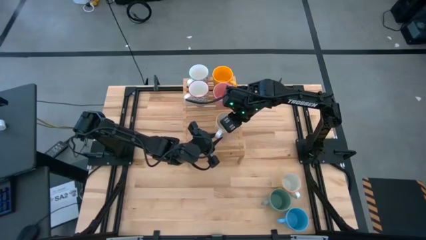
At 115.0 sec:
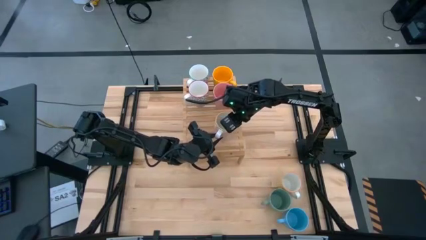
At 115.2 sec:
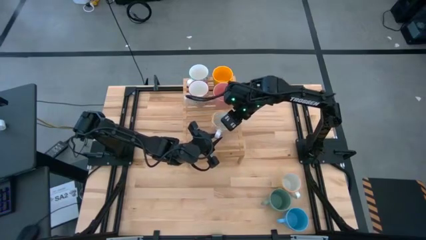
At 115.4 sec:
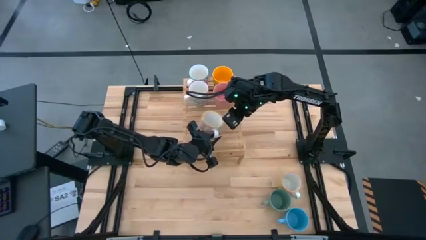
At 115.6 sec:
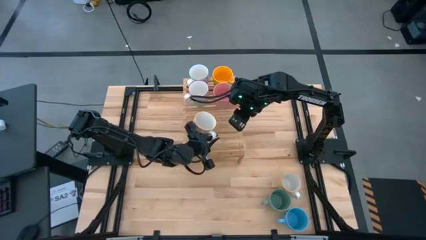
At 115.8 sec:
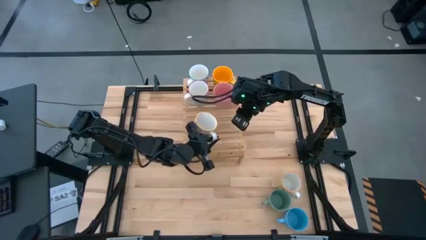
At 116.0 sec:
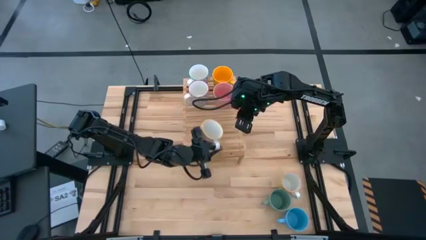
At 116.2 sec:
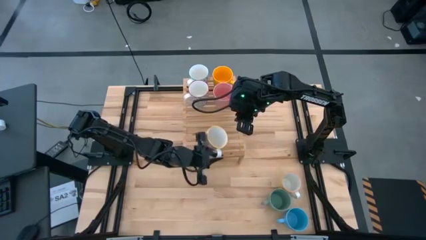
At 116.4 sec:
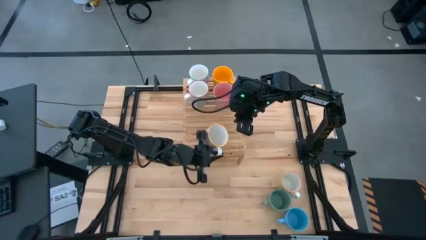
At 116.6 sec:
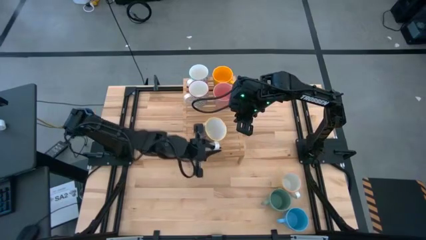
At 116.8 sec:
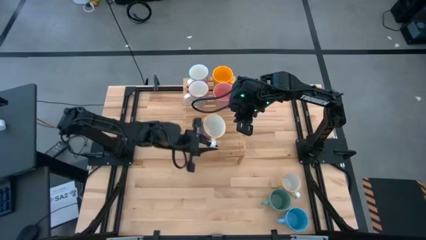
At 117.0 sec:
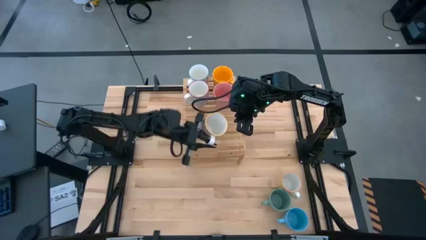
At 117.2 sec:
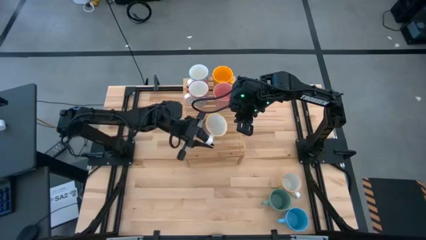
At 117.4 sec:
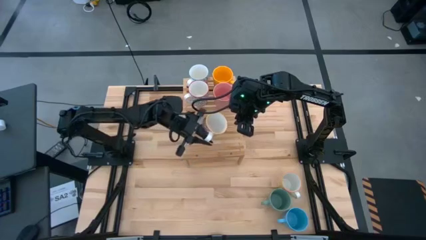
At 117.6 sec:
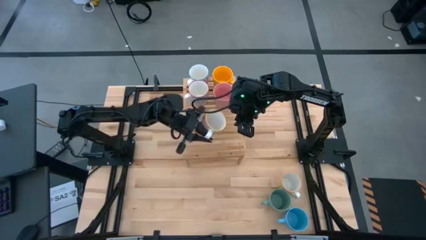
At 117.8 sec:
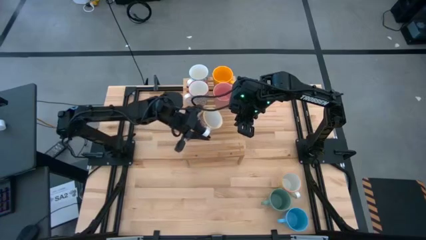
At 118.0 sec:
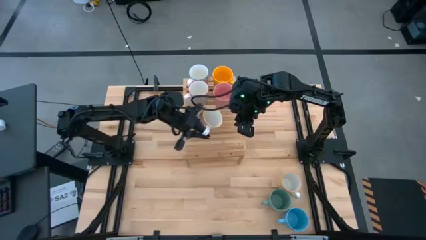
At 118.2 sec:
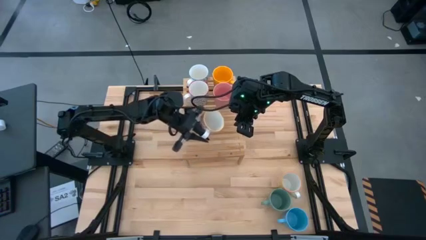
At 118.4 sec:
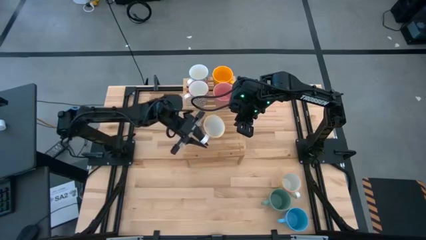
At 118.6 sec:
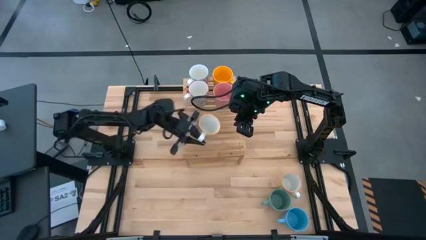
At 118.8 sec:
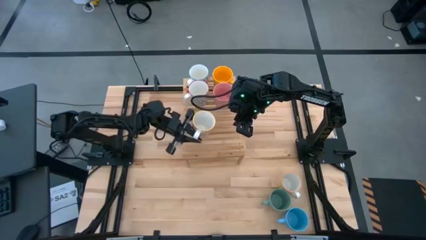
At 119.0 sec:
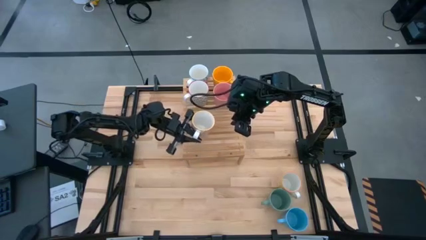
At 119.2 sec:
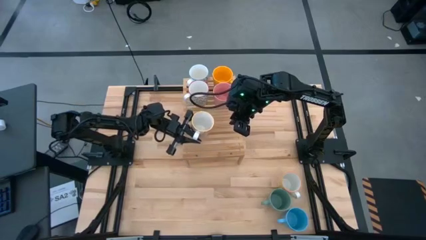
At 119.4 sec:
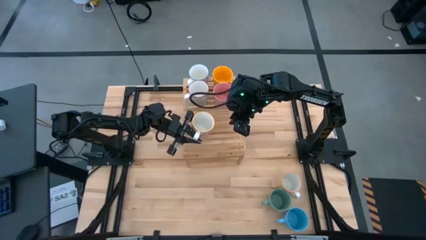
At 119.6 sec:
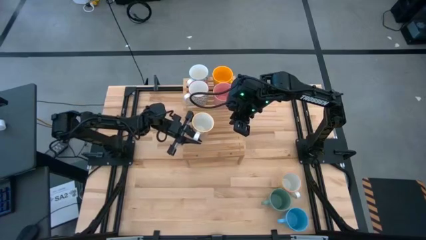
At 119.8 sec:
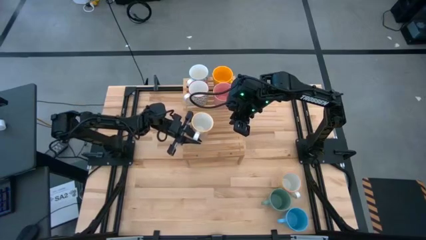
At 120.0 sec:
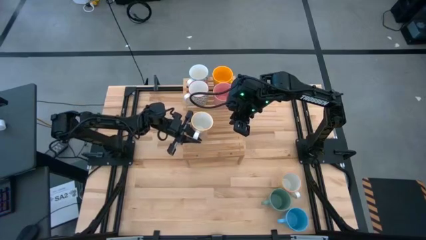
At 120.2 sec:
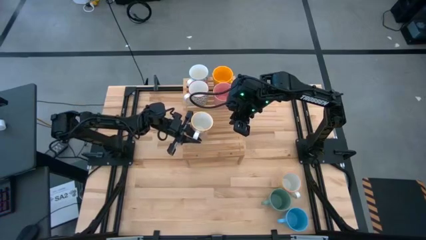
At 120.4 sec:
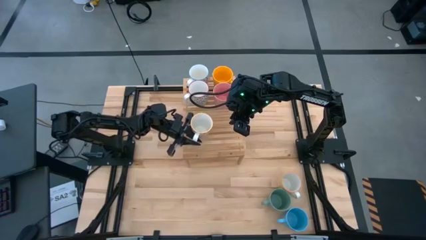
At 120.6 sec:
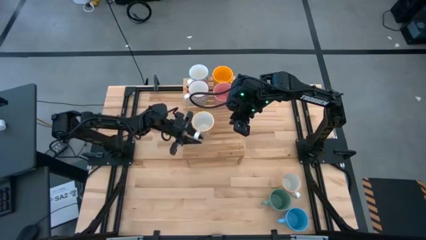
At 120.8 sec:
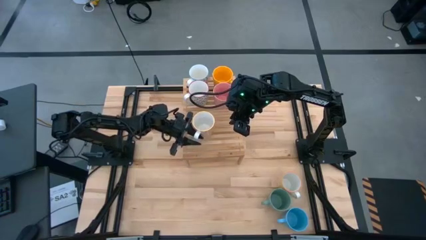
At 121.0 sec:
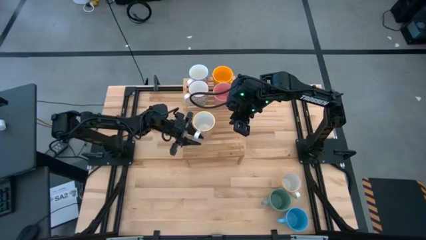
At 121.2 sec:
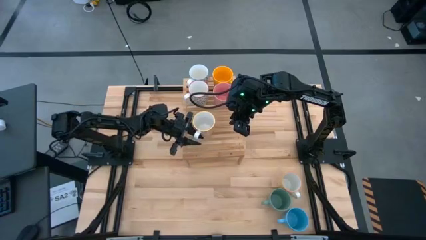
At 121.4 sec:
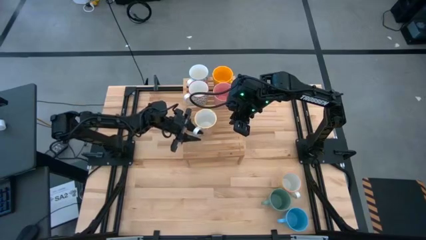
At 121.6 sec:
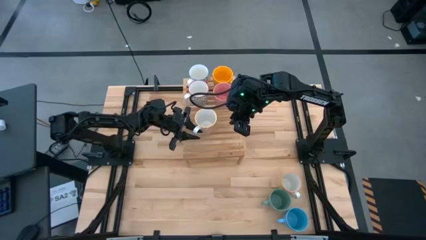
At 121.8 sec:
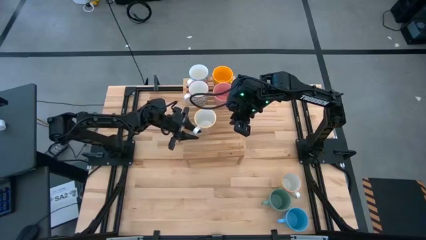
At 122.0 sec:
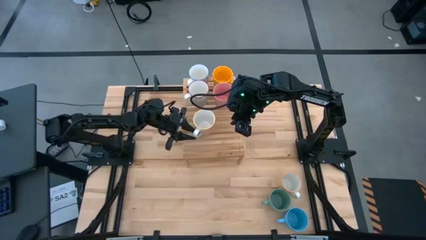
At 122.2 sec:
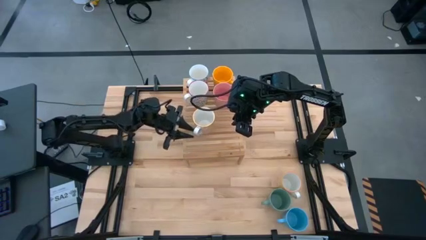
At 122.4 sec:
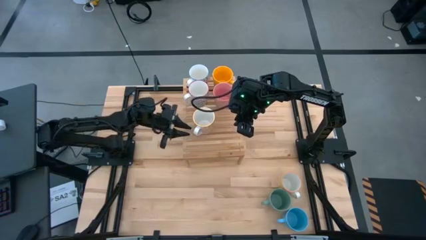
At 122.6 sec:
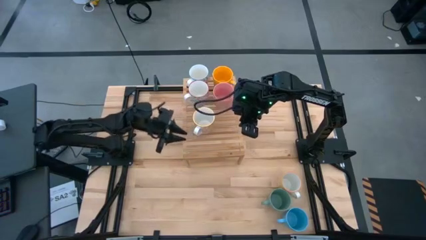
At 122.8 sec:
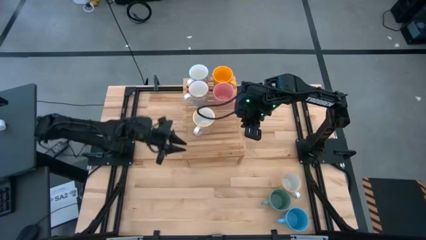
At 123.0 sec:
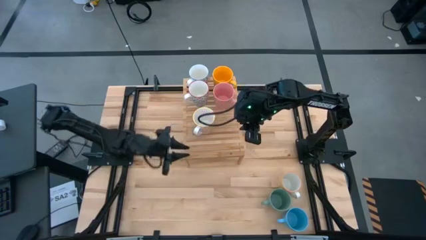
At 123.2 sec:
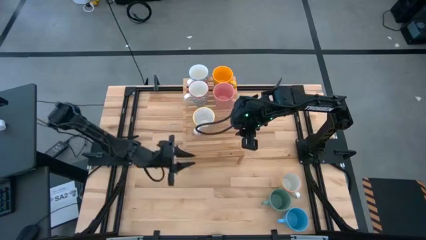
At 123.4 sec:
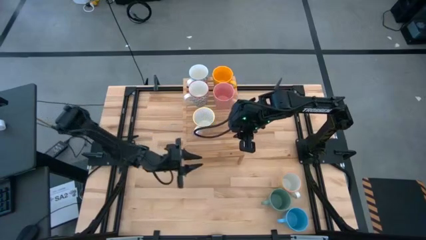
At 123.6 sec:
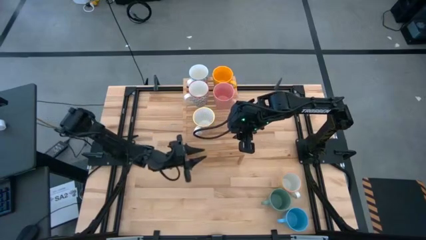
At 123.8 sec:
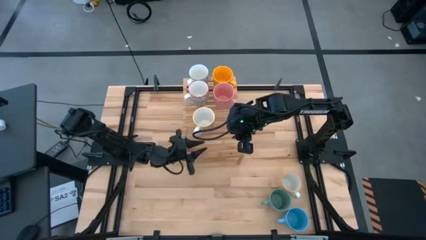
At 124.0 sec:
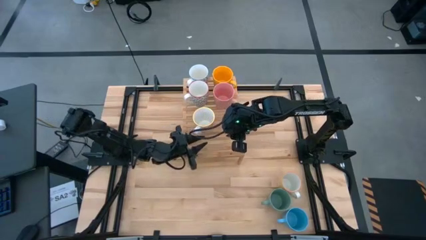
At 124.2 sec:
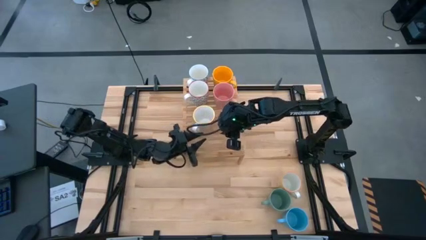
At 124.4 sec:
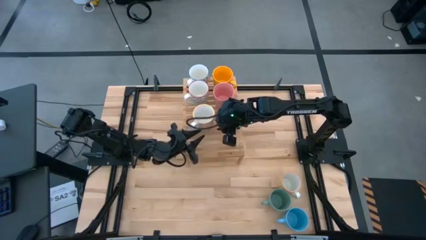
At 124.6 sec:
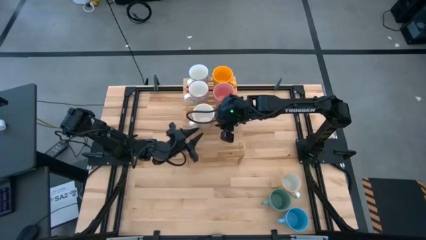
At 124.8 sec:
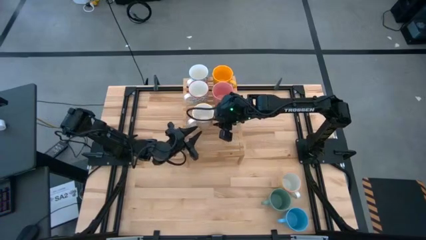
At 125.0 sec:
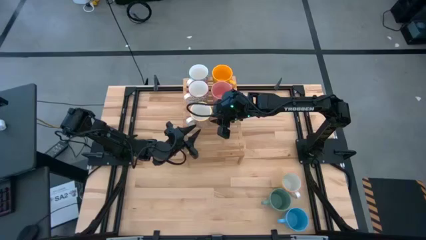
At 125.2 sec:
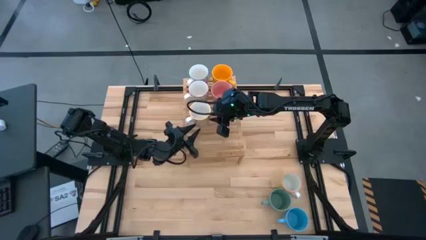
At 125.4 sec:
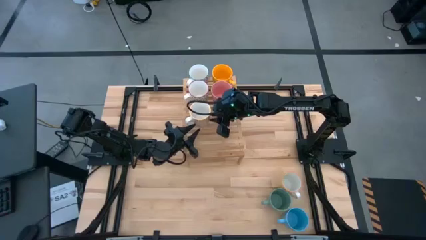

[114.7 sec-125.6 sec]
Task: Place coffee mugs
Put the orange cup on the shelf aligned with the other gray cup

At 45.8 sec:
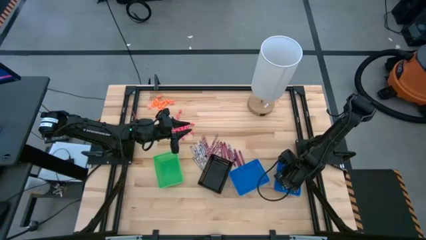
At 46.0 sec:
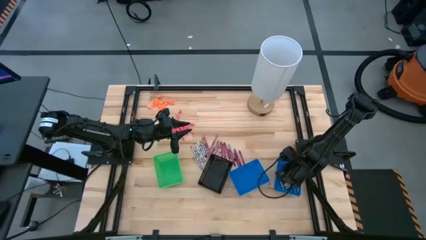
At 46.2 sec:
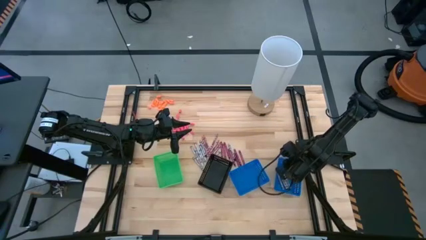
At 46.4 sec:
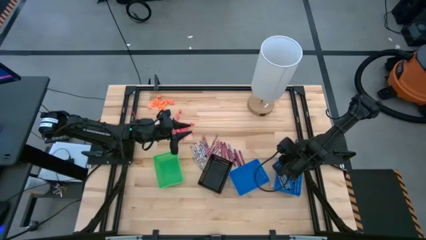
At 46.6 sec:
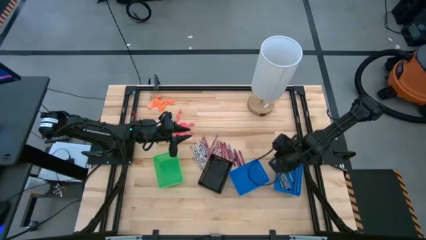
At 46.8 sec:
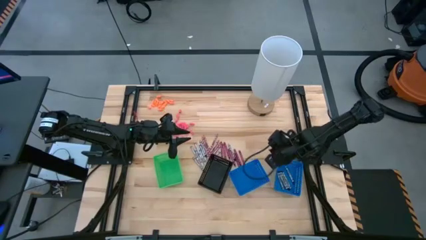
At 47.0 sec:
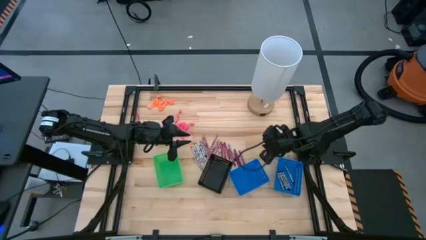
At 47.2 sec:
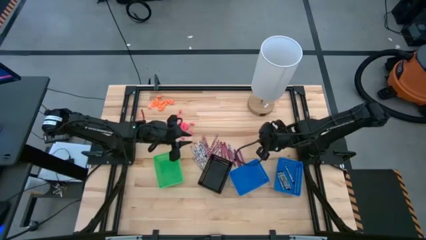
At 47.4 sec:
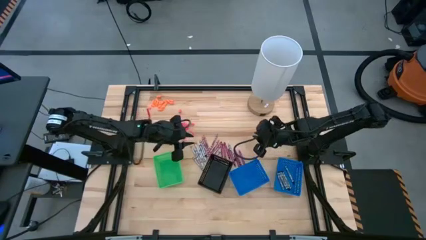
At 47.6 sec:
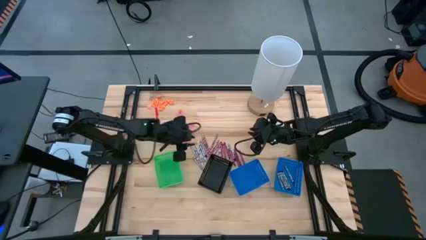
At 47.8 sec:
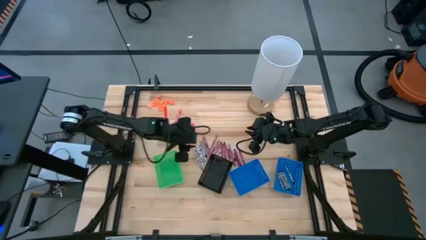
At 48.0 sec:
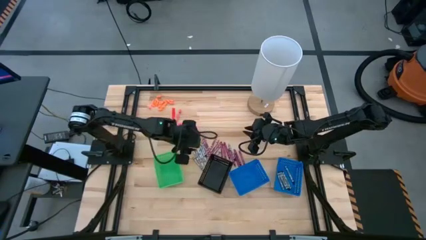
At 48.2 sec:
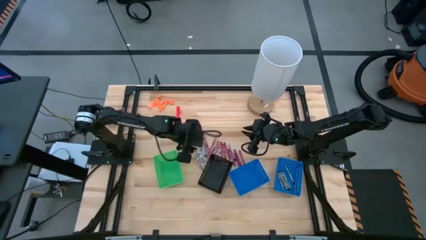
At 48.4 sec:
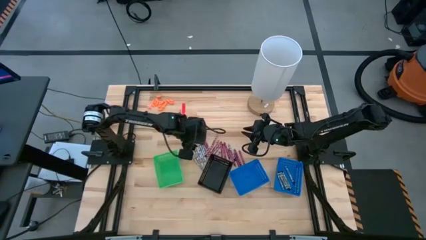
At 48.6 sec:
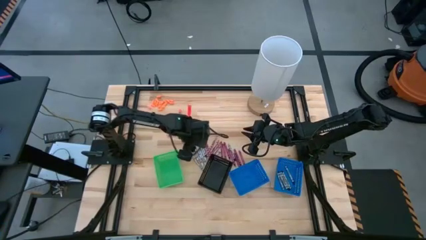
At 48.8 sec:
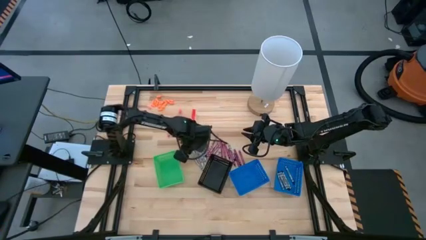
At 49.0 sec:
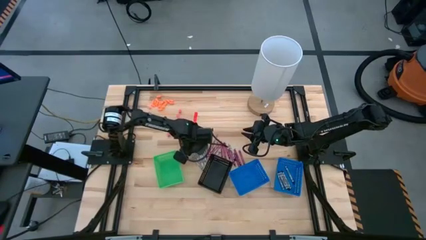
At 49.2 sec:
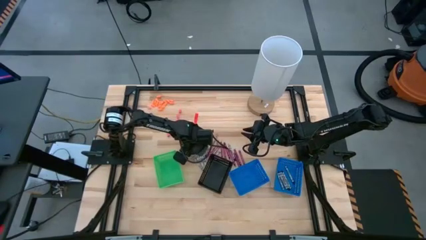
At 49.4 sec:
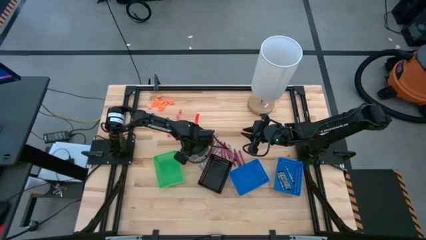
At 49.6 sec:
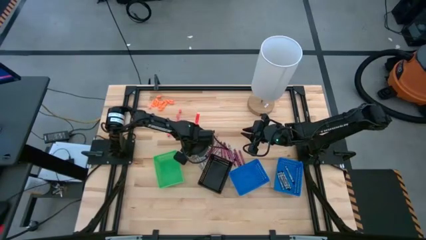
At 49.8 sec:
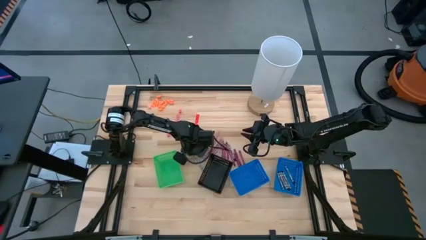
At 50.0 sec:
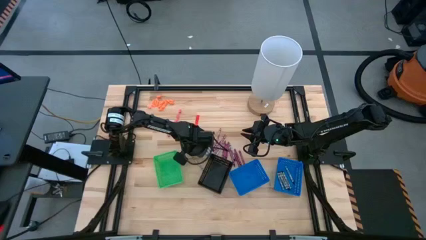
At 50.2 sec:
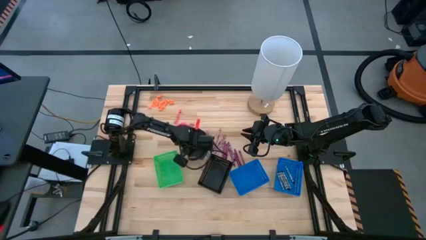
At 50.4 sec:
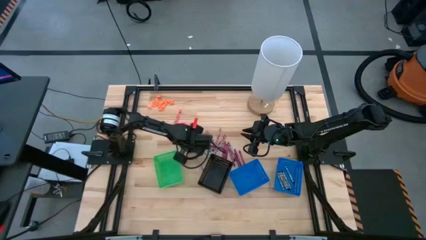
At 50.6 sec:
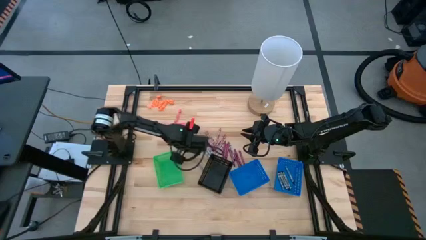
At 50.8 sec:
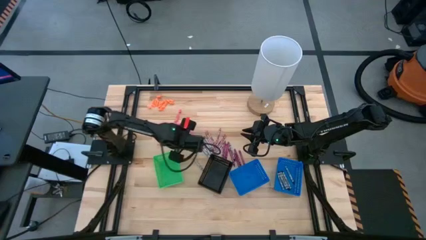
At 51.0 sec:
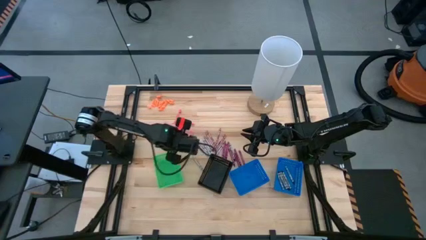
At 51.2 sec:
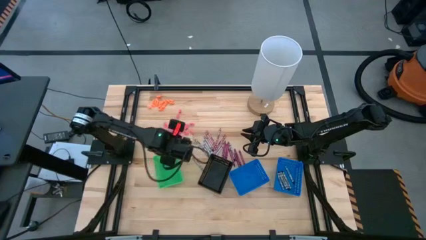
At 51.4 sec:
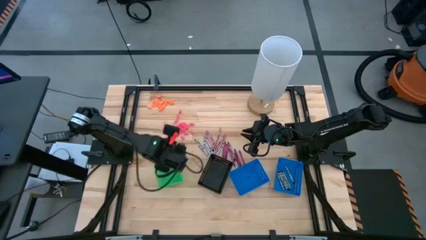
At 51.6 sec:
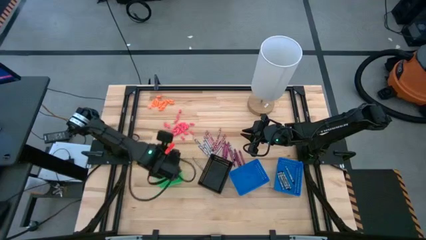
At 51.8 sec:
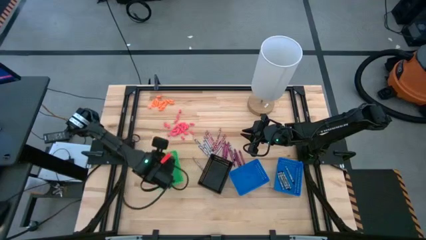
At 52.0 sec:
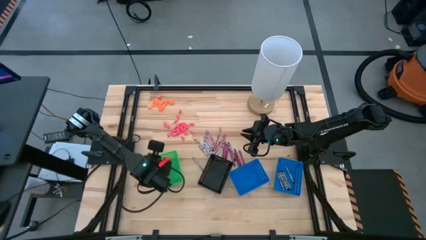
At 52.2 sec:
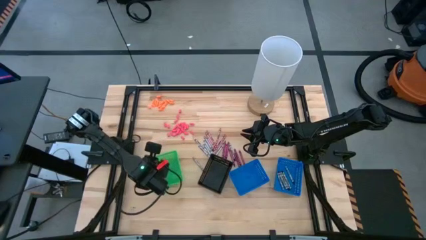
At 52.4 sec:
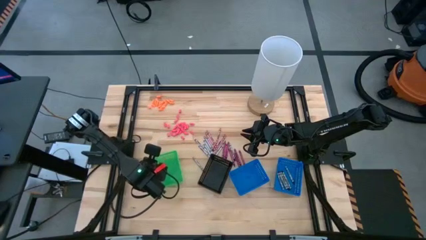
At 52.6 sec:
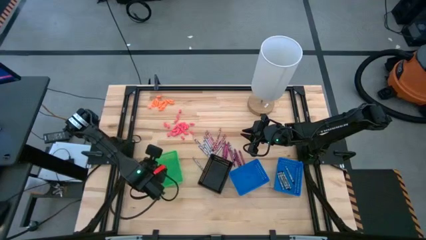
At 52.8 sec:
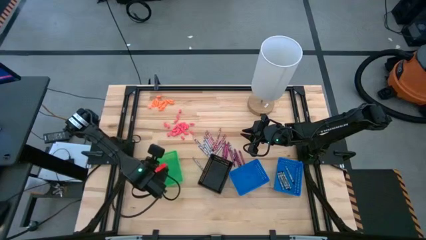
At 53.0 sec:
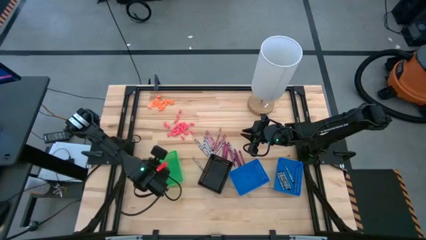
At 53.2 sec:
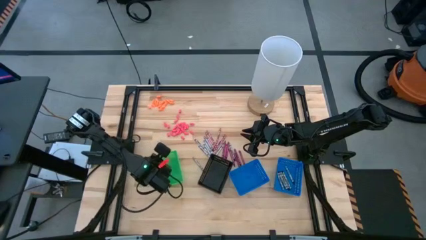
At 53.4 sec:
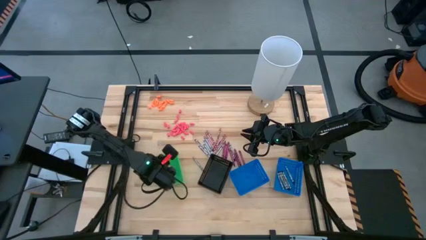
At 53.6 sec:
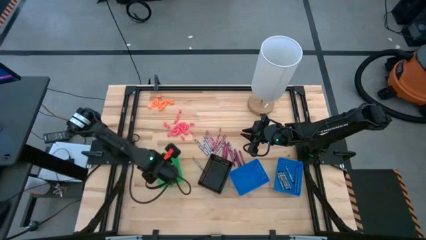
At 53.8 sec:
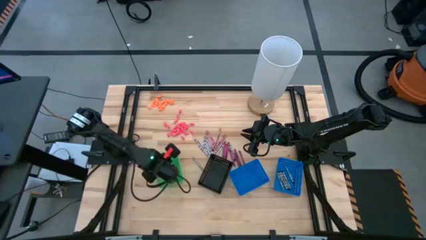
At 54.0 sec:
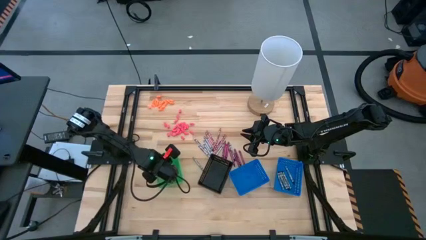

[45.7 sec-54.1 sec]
Task: Sort crayons
Put the white crayon into the green bin
